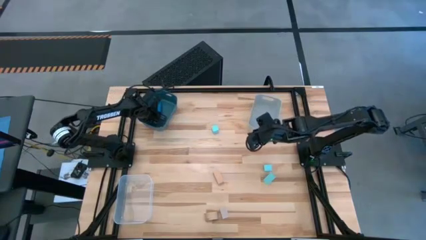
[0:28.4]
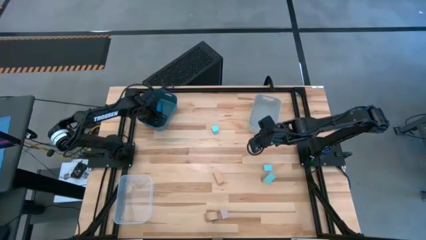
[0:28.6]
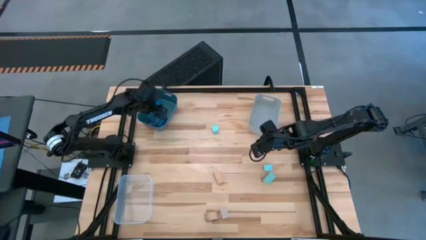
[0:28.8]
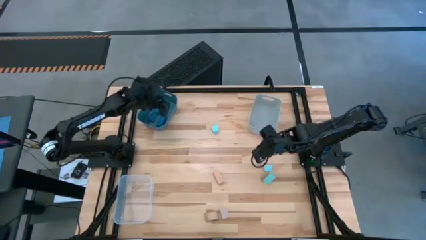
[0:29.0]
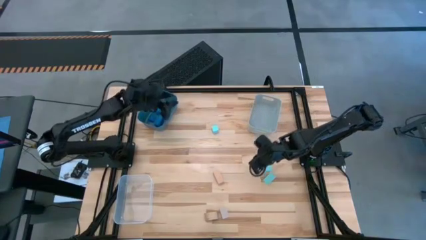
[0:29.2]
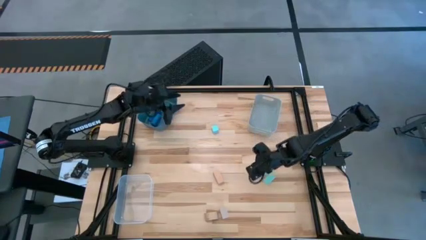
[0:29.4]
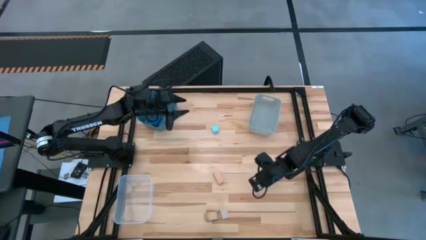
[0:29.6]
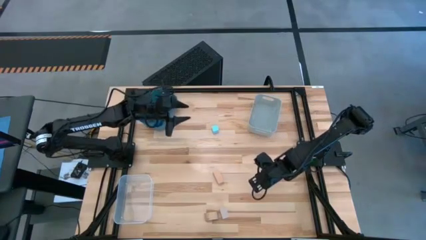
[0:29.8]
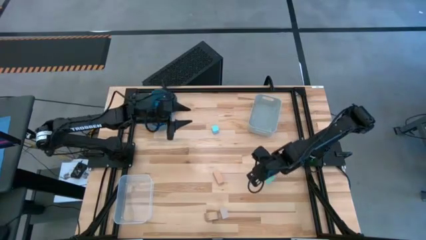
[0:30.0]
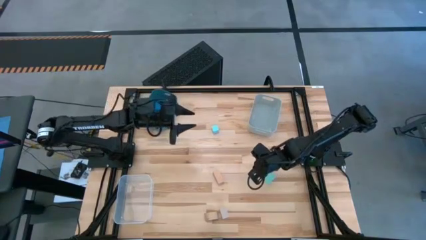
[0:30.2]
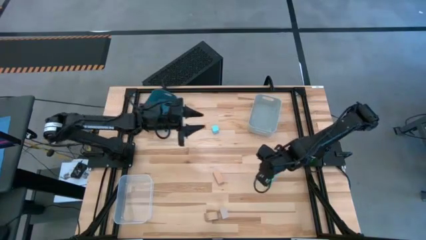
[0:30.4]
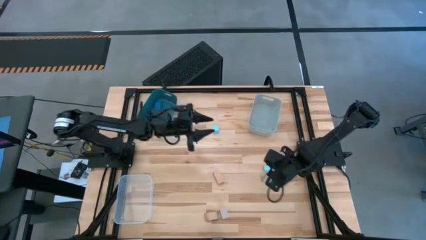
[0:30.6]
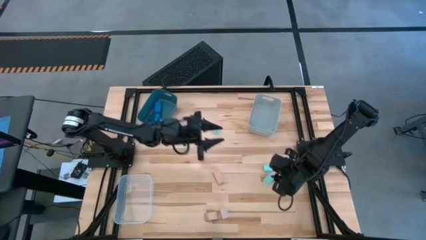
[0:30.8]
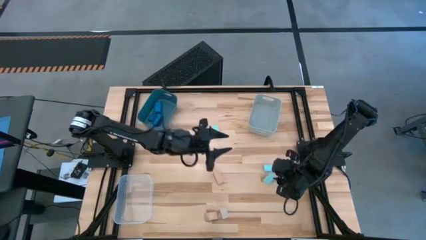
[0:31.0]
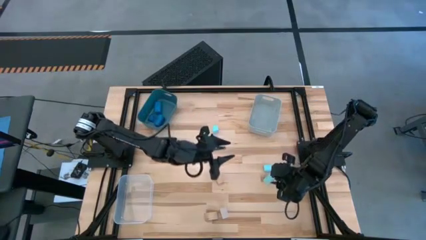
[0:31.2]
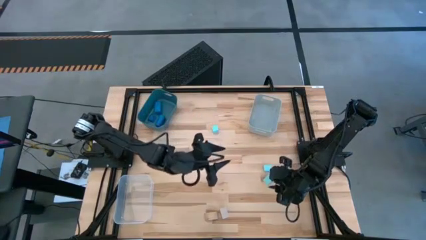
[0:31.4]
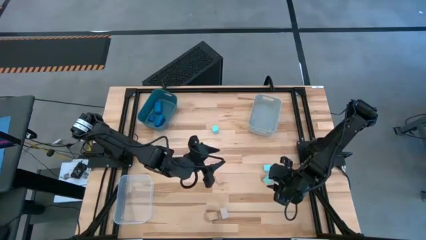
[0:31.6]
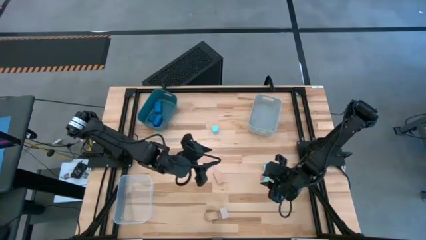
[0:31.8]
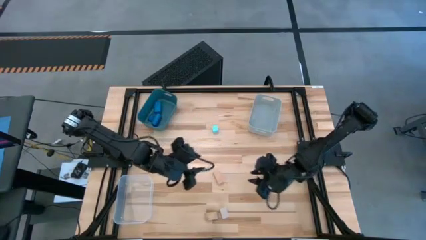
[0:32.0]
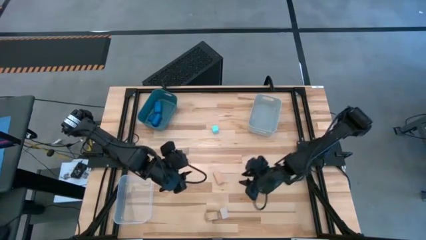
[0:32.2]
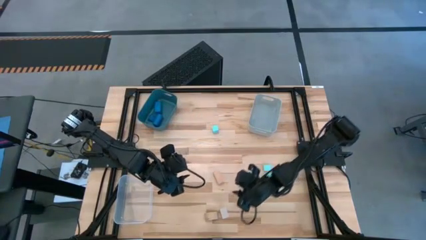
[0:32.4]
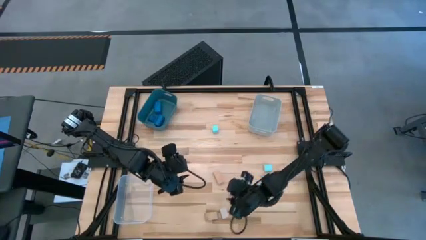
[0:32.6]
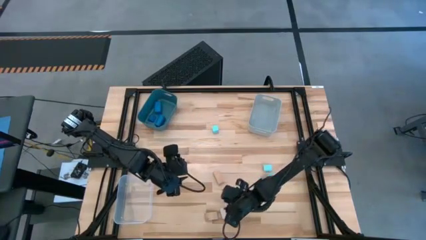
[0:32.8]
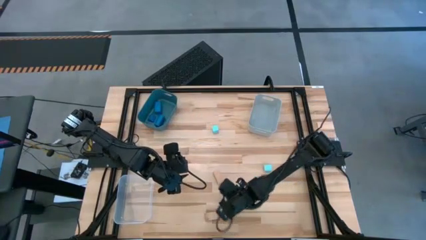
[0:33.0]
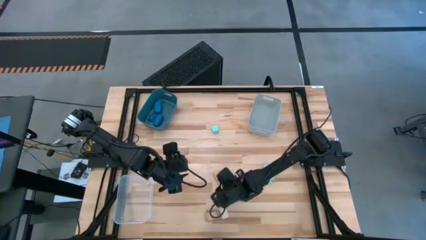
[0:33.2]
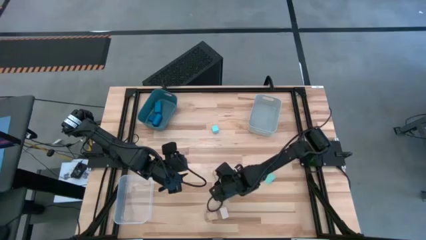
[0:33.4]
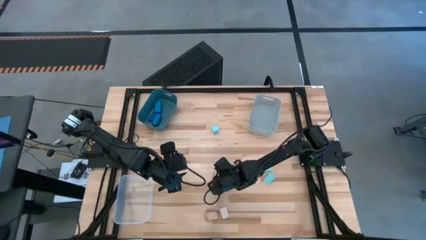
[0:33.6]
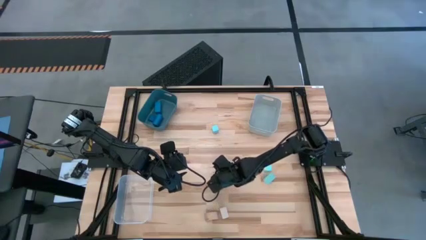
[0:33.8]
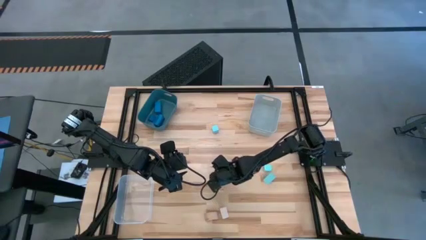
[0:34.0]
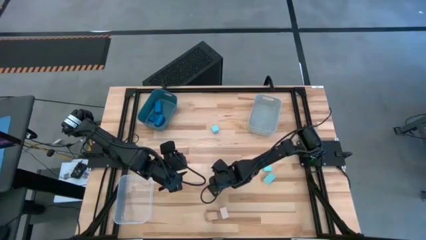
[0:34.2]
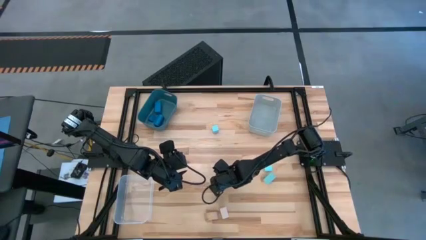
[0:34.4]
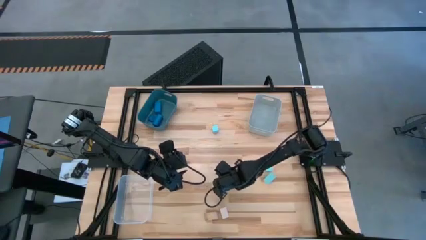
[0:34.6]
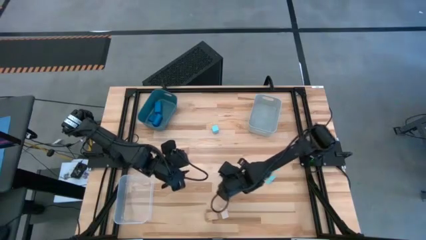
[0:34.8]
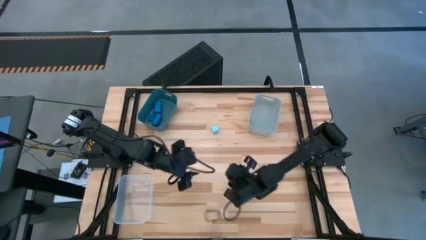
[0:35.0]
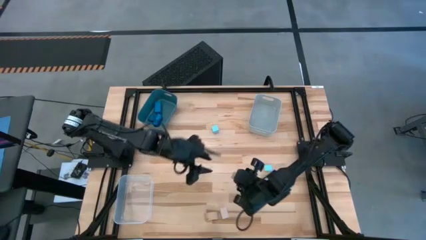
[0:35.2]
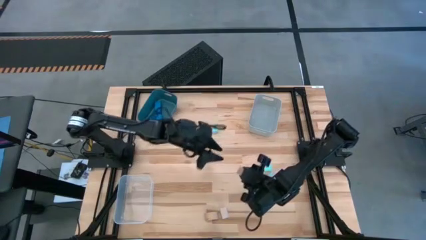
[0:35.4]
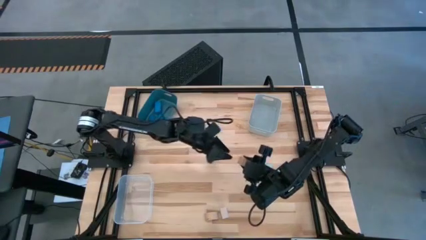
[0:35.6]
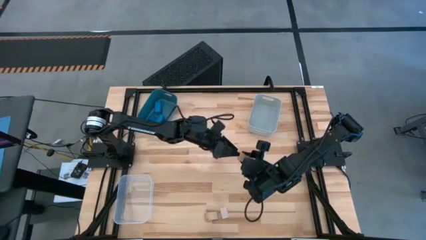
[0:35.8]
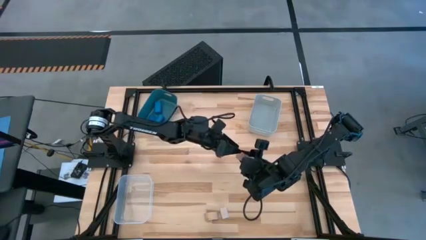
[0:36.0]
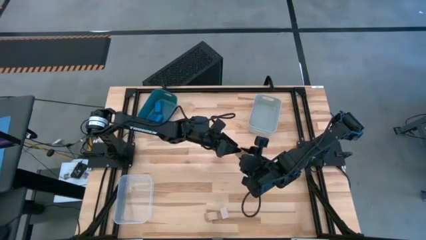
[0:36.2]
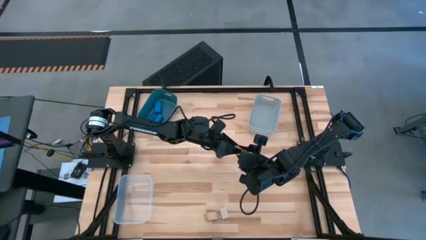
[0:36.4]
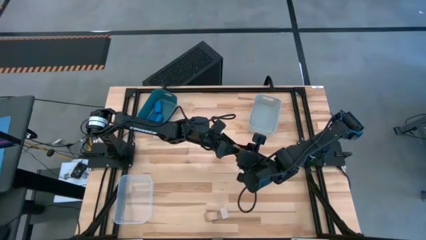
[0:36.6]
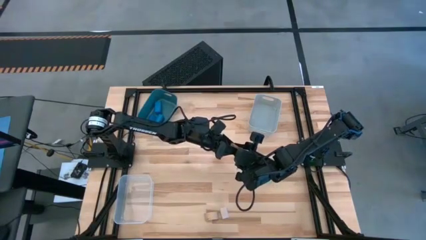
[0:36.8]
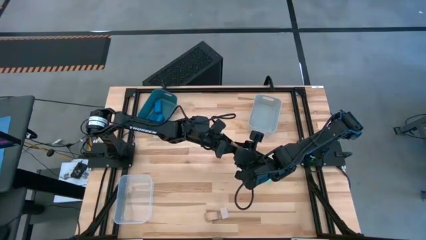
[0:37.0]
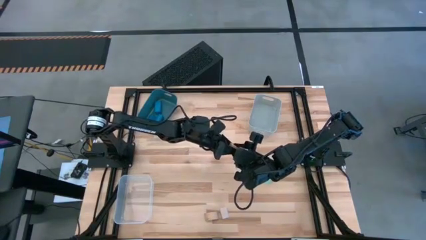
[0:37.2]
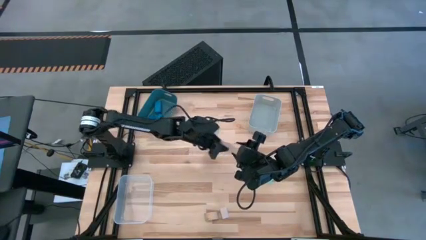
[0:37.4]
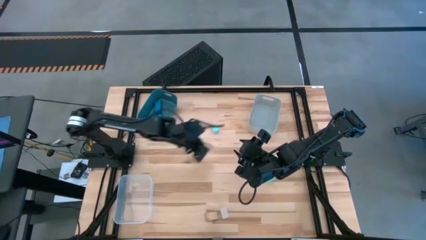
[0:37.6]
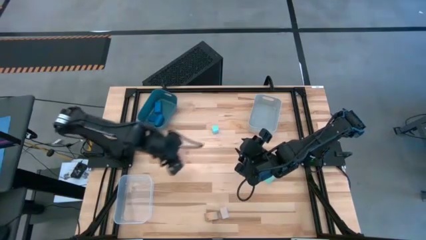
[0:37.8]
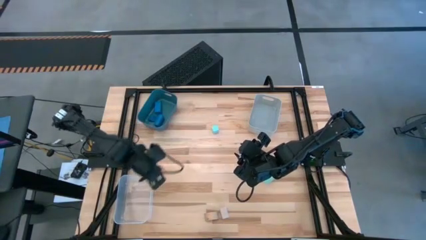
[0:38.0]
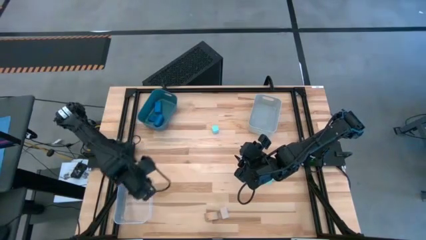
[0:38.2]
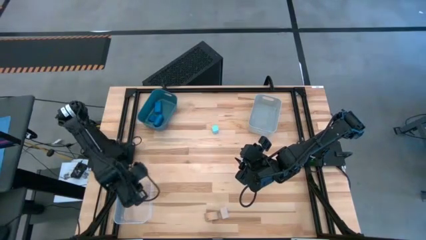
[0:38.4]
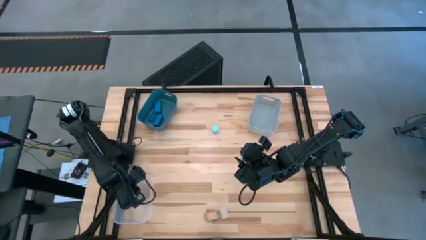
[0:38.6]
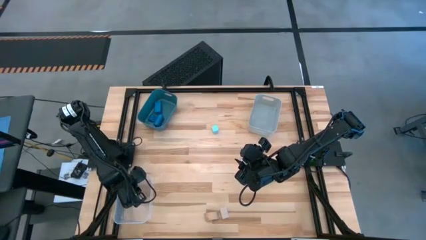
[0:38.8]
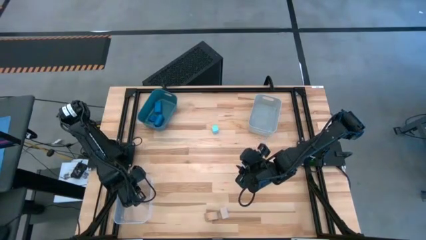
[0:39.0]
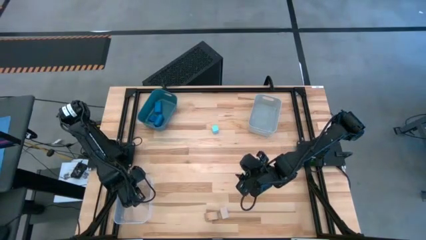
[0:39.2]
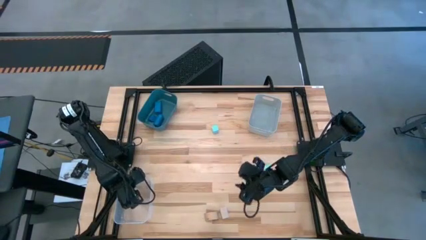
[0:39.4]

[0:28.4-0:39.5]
Task: Sort & place blocks by color
Put the top right brown block into the transparent bin

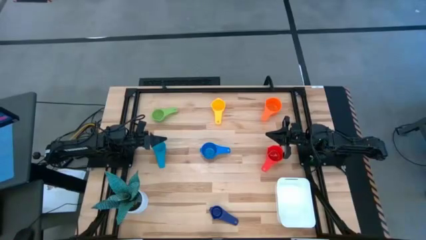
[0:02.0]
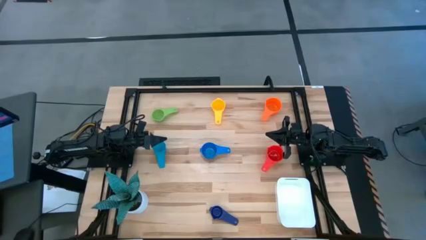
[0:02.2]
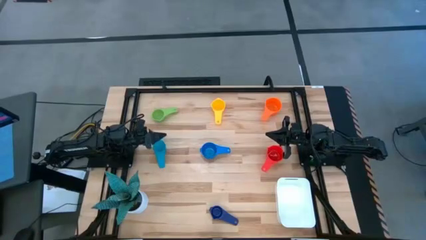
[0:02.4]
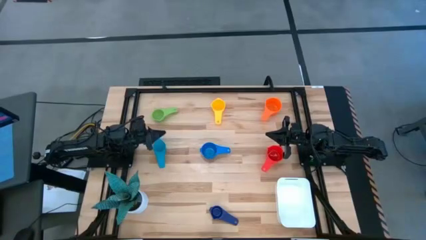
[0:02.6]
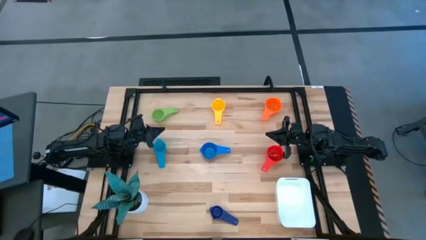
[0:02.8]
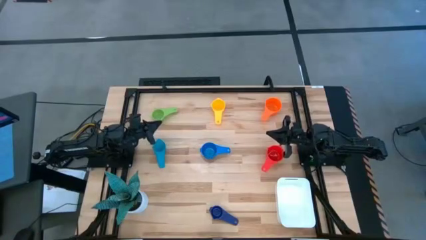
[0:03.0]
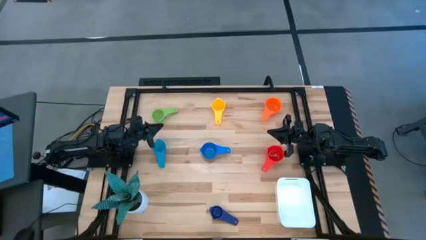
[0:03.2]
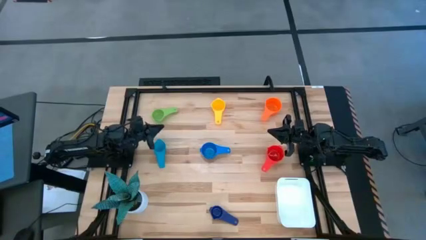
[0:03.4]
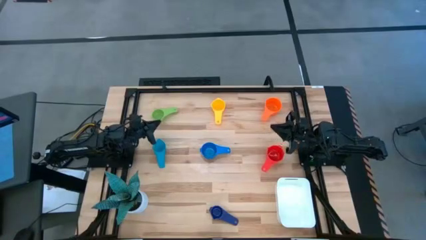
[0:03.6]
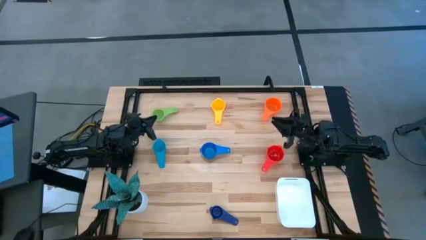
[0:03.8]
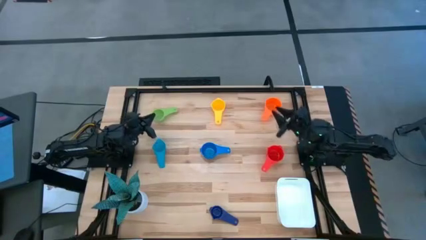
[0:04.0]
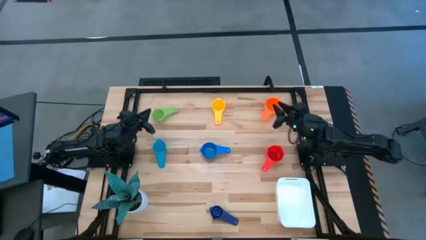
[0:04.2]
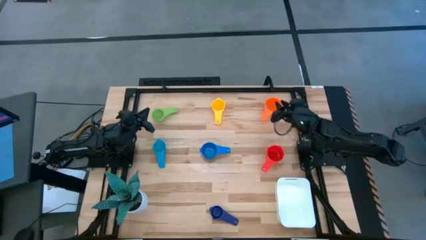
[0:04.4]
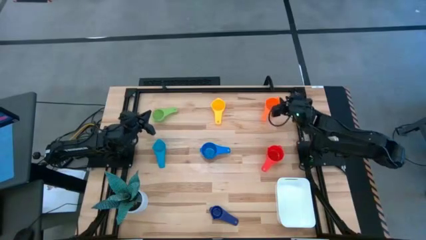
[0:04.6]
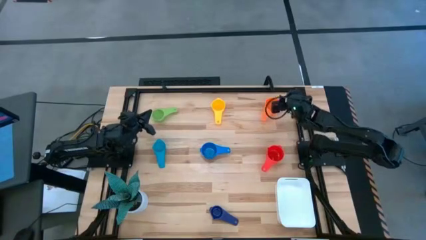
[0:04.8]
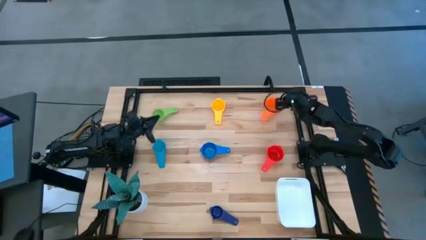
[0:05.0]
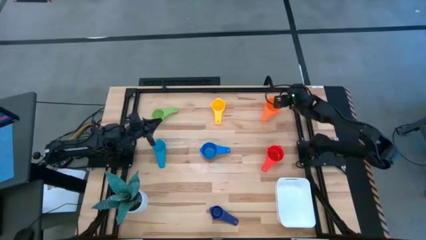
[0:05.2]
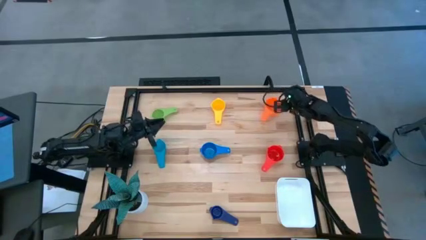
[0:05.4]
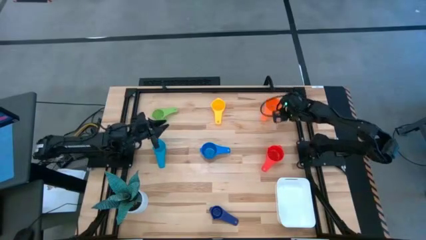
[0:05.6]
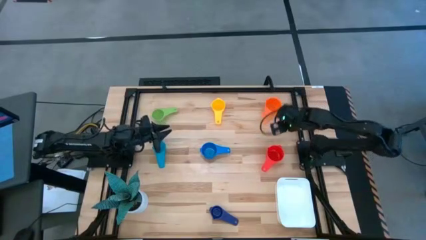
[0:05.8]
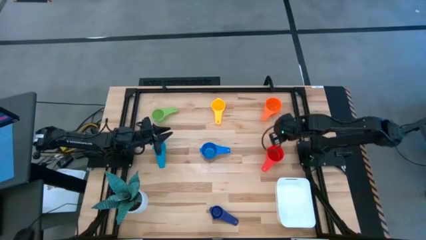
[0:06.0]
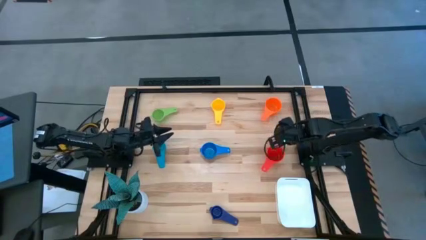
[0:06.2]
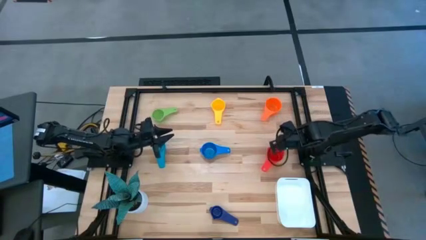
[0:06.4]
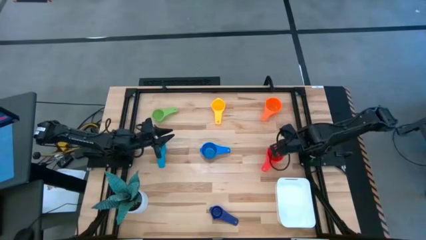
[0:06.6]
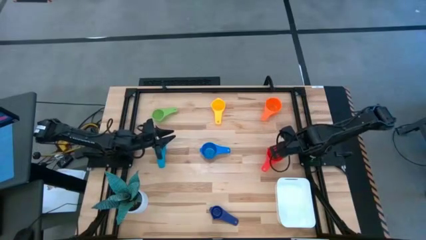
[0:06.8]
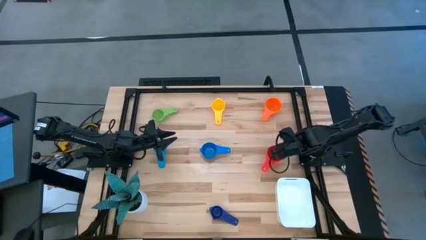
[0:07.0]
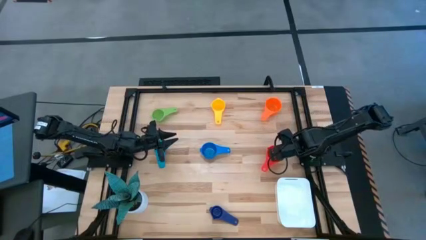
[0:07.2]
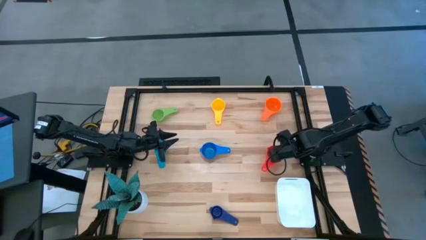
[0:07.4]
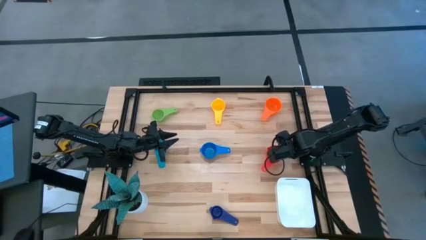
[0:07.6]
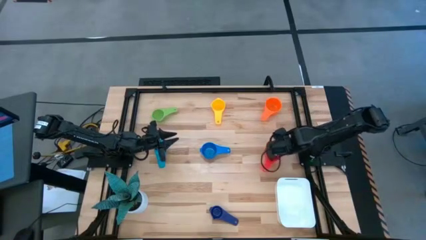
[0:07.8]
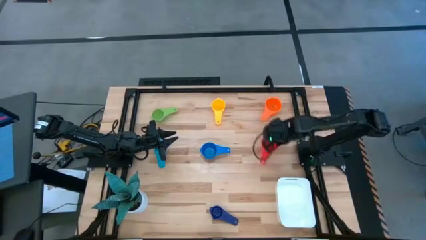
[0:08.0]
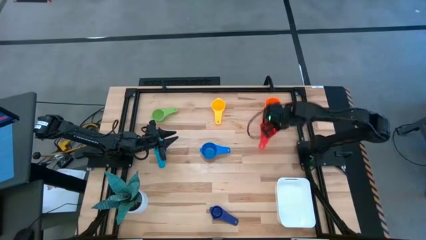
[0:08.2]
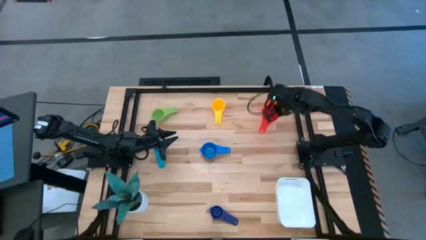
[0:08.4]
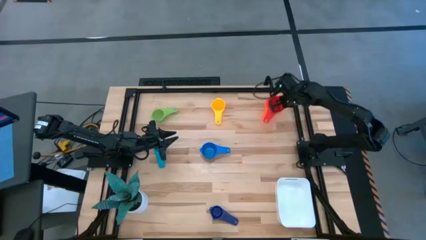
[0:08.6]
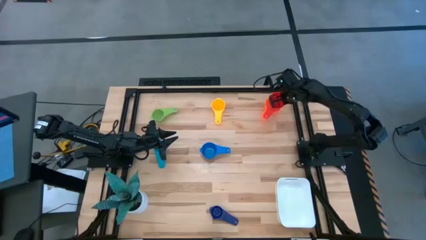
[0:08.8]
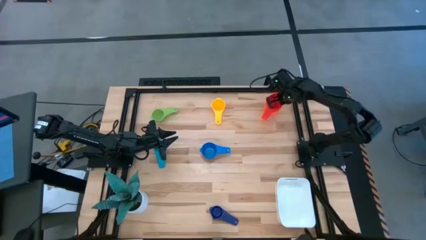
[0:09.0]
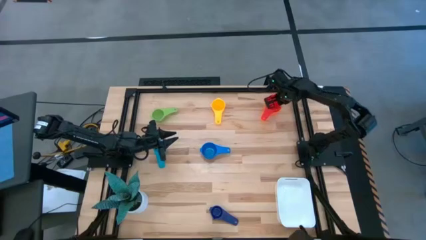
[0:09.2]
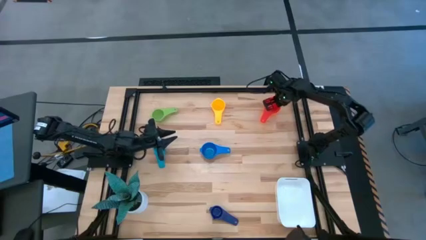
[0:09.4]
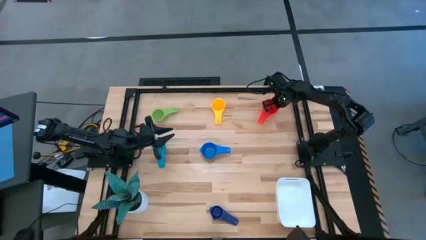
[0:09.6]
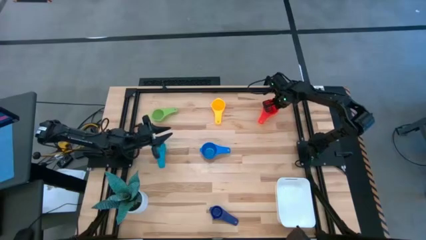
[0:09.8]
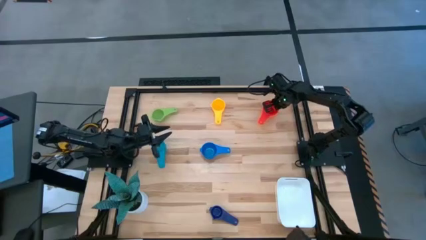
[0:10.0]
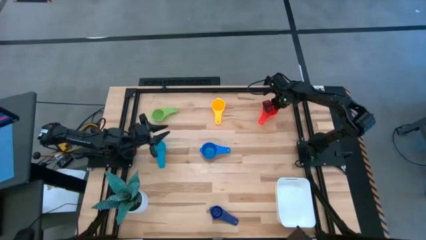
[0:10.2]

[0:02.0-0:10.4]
Task: Nest measuring cups in basket
Stack the red measuring cup on the orange measuring cup
